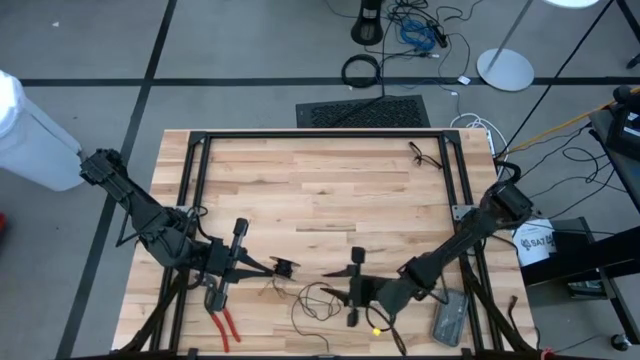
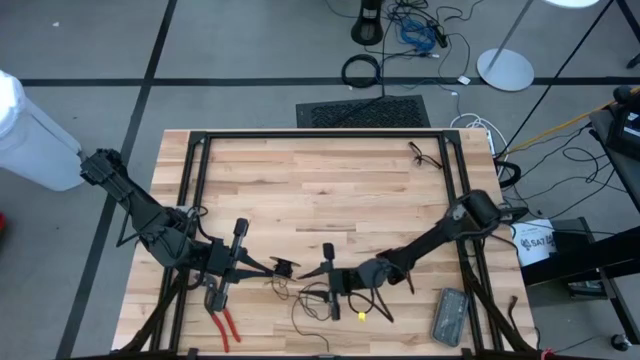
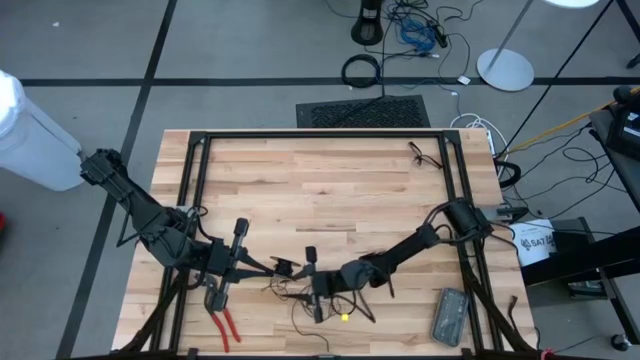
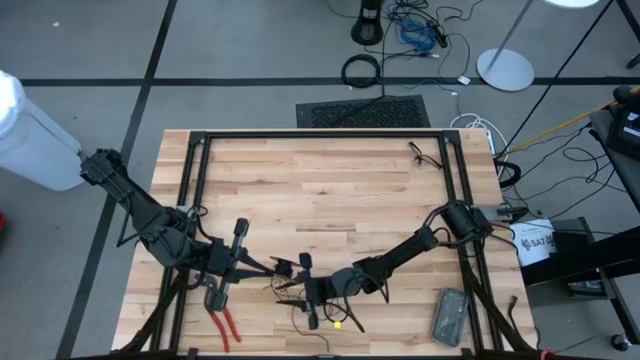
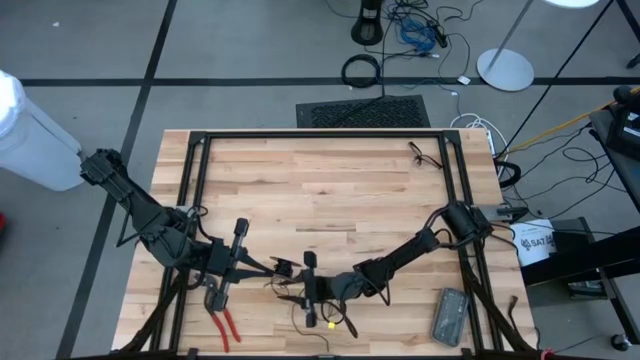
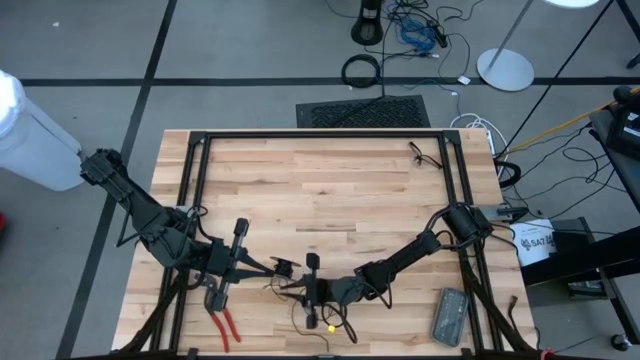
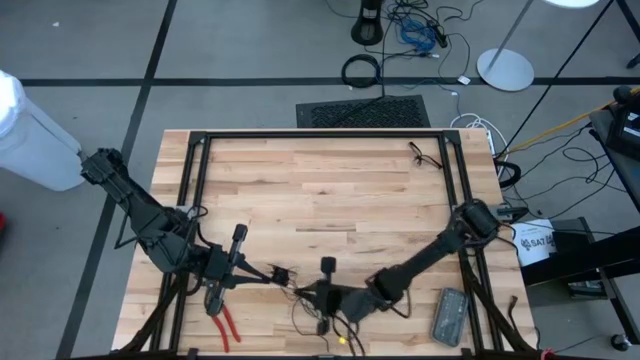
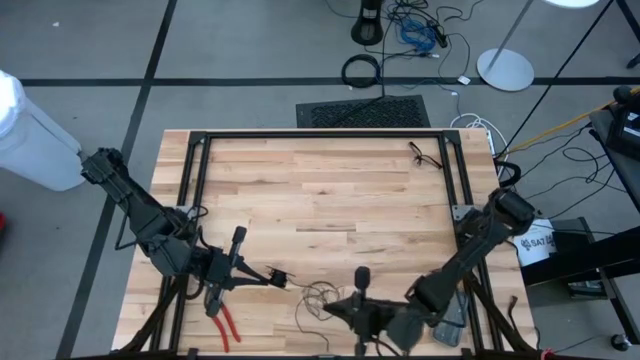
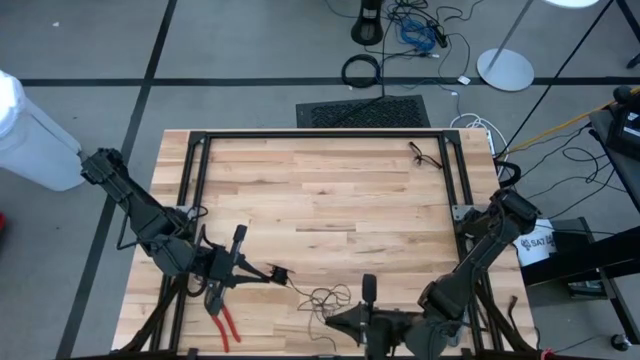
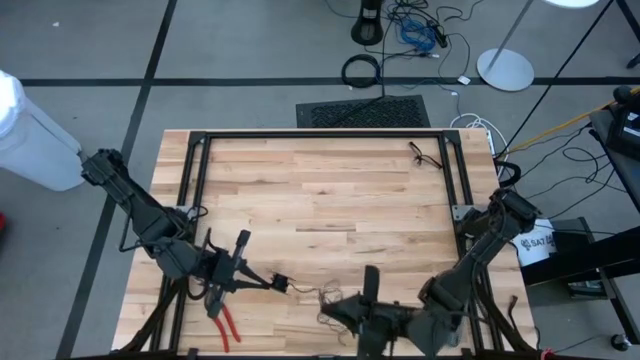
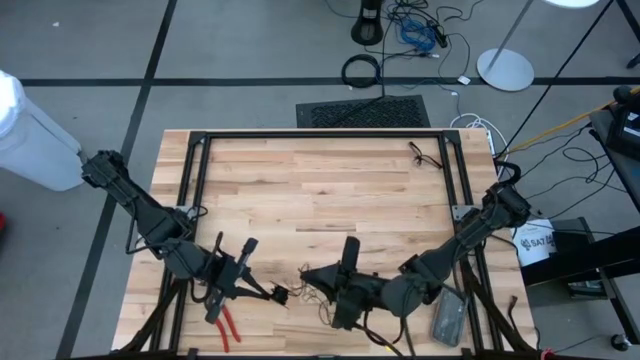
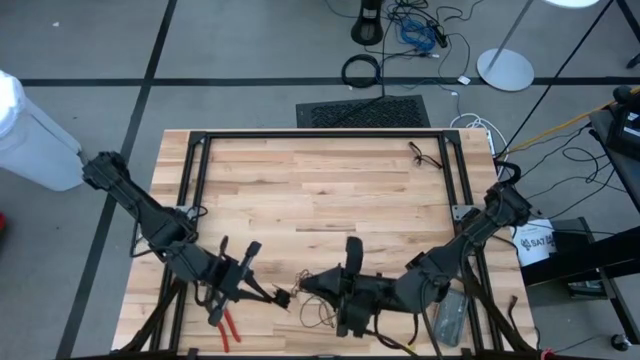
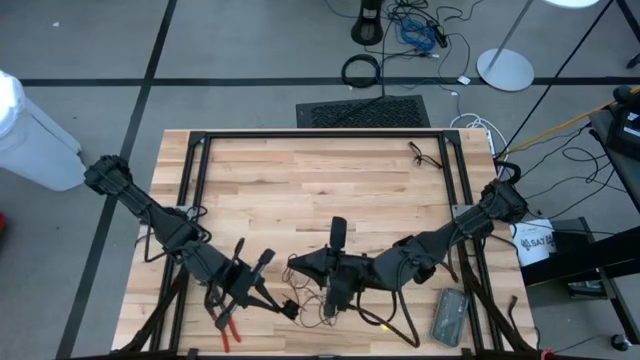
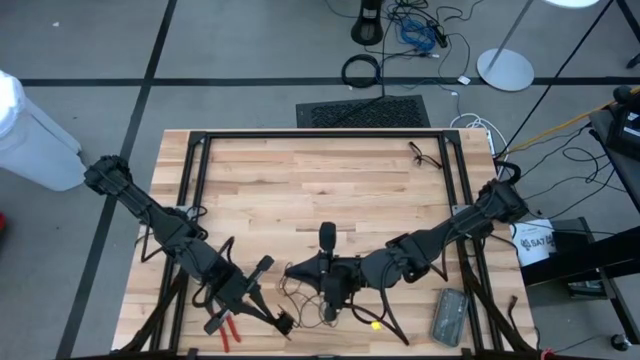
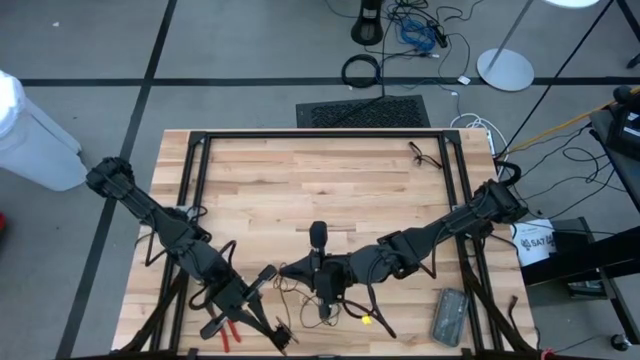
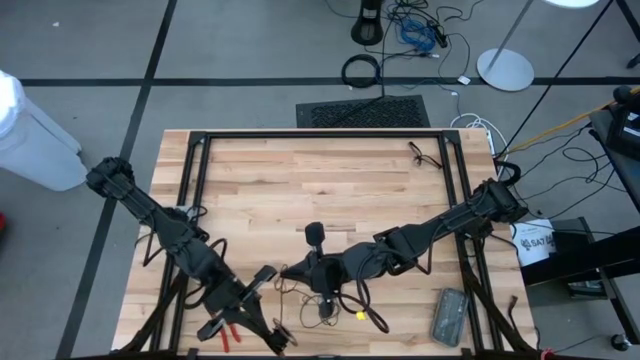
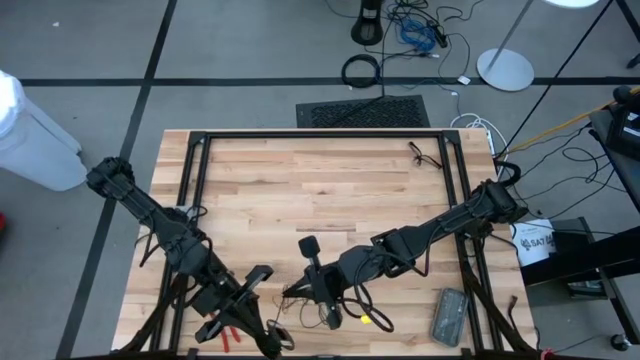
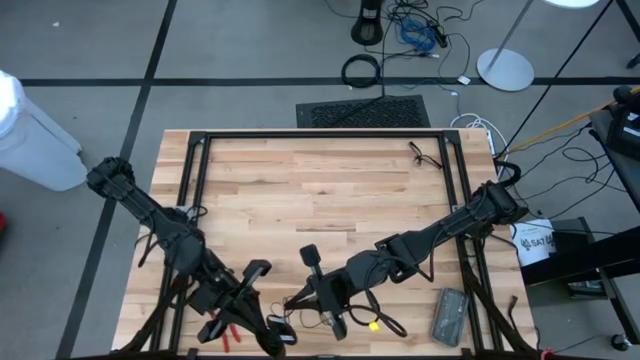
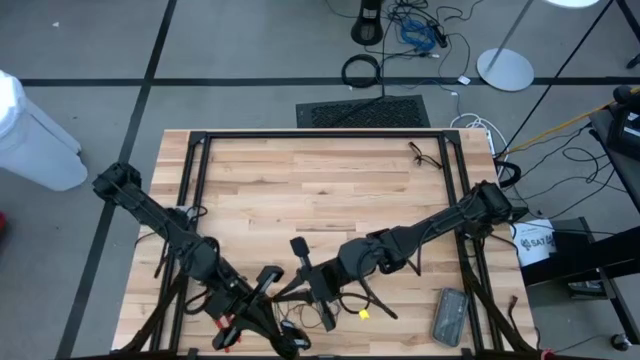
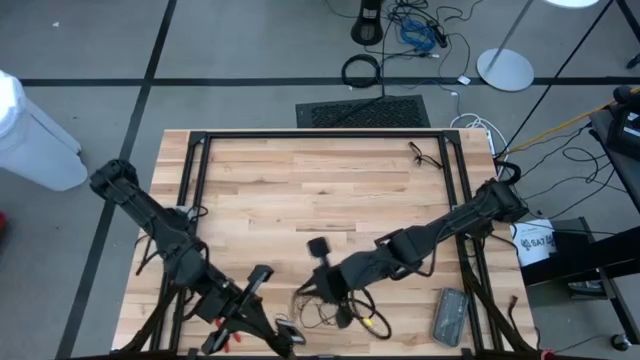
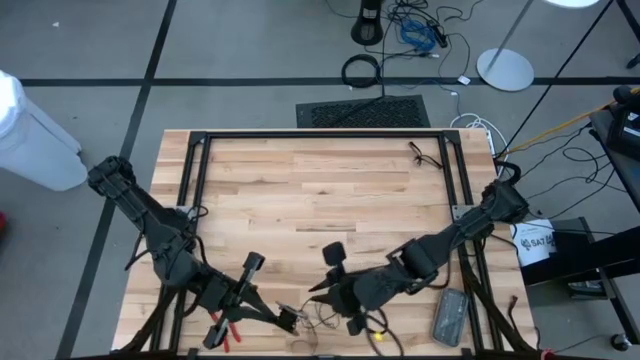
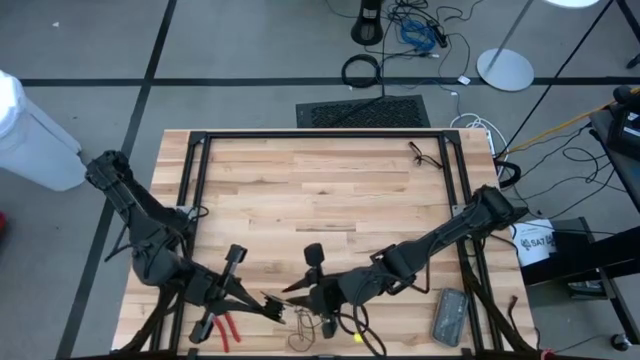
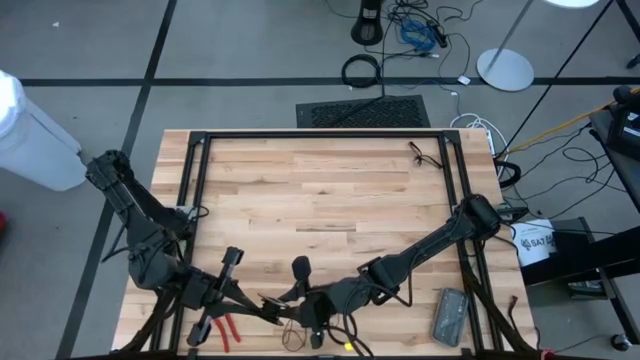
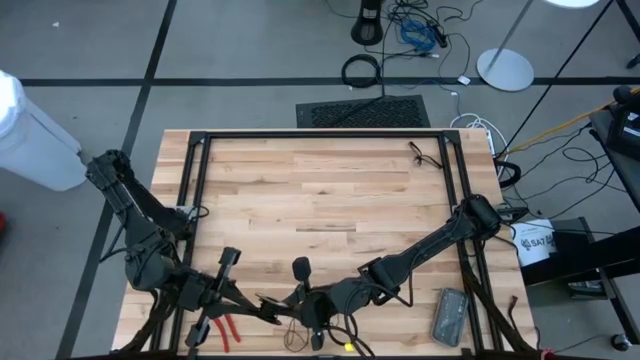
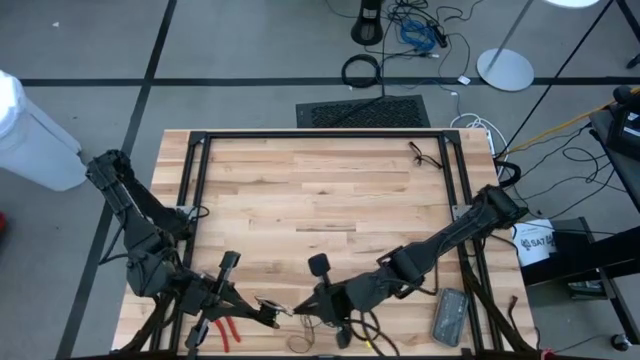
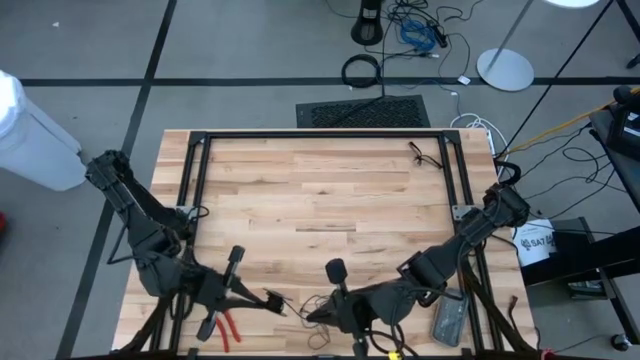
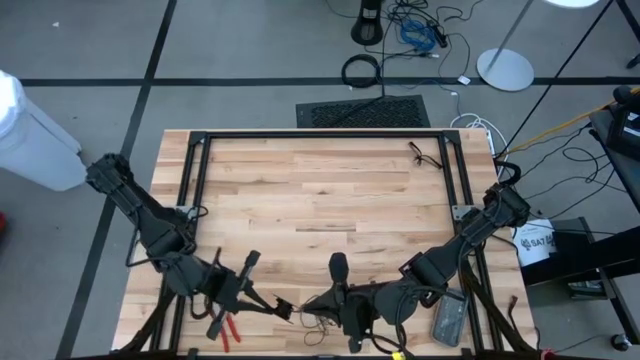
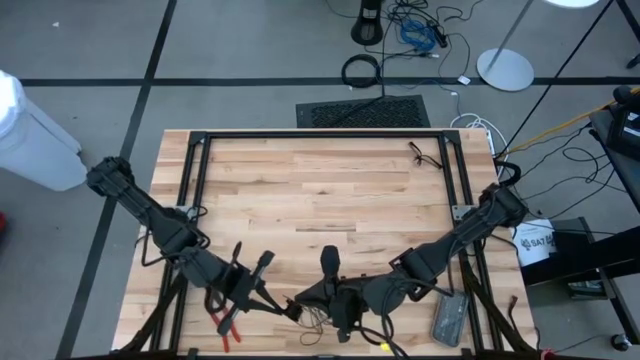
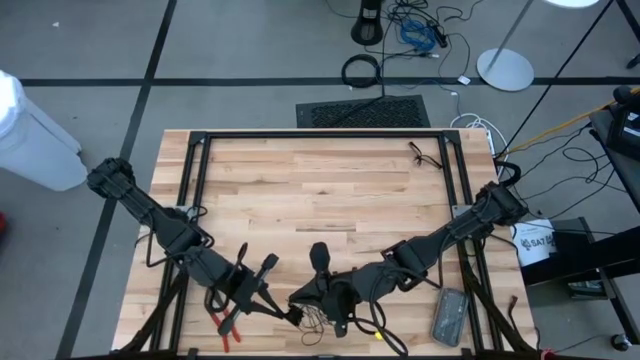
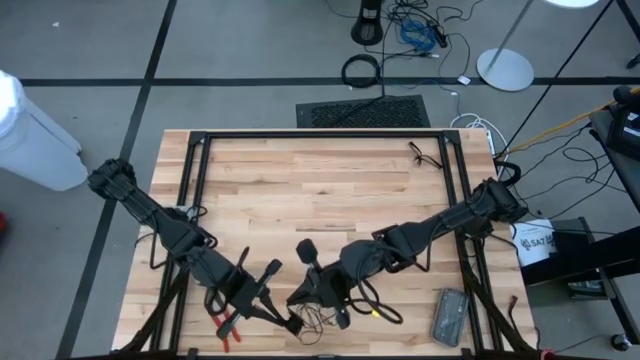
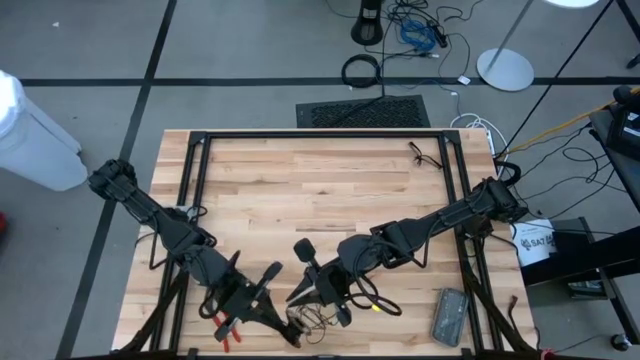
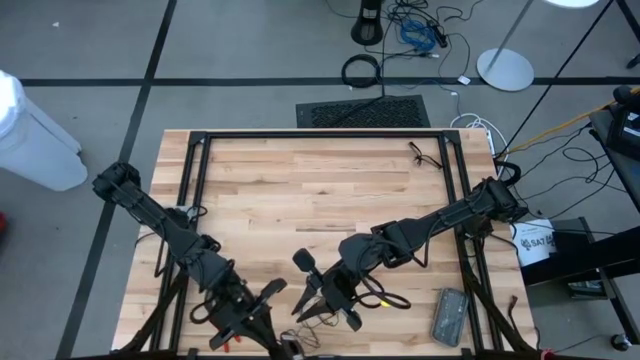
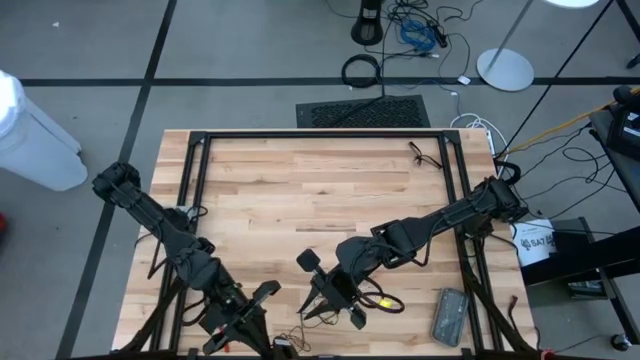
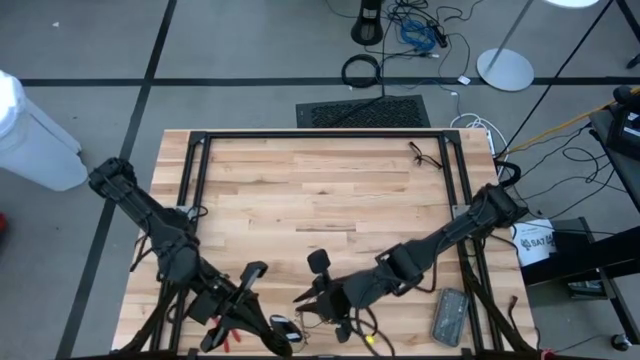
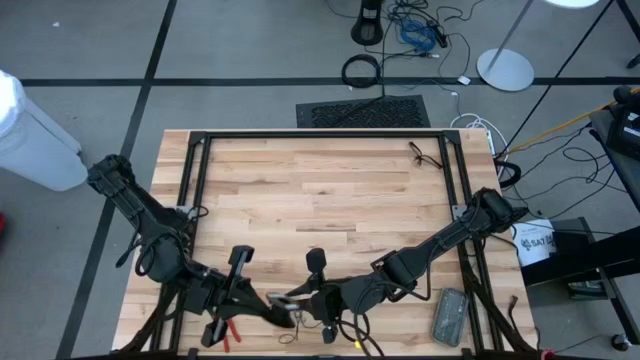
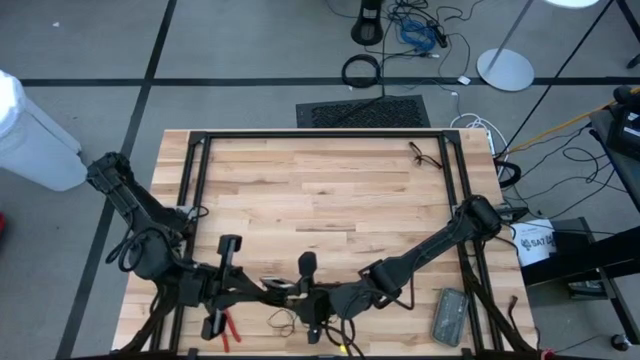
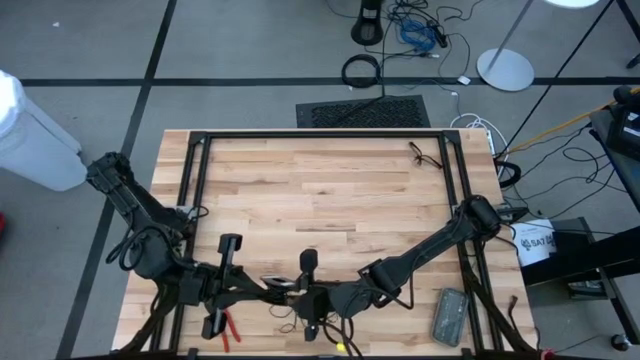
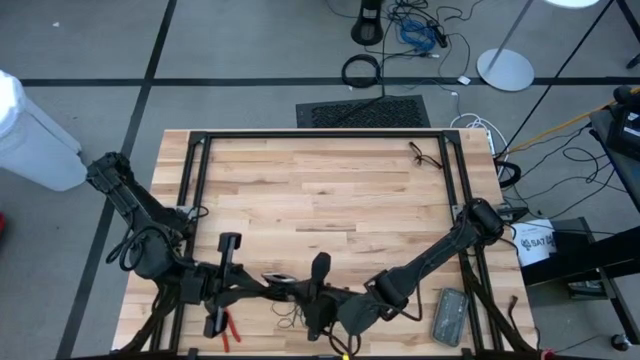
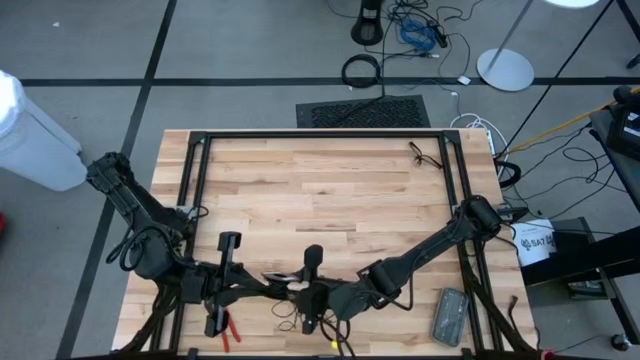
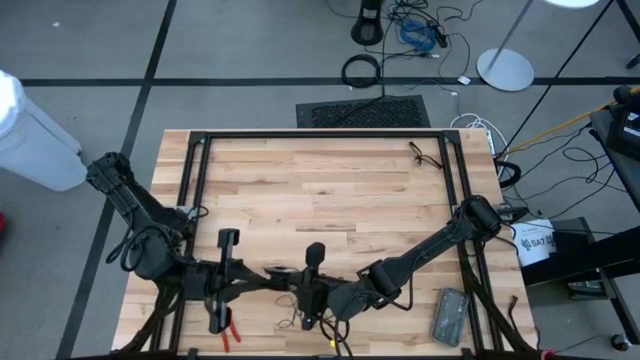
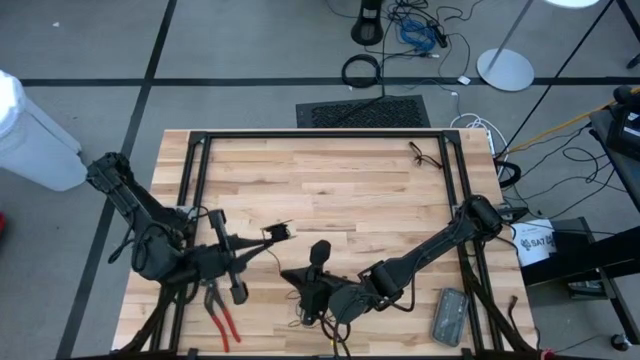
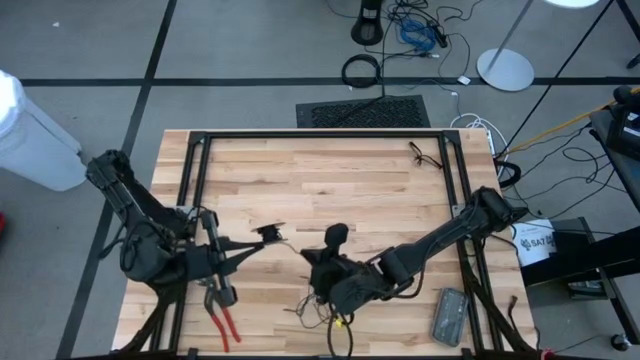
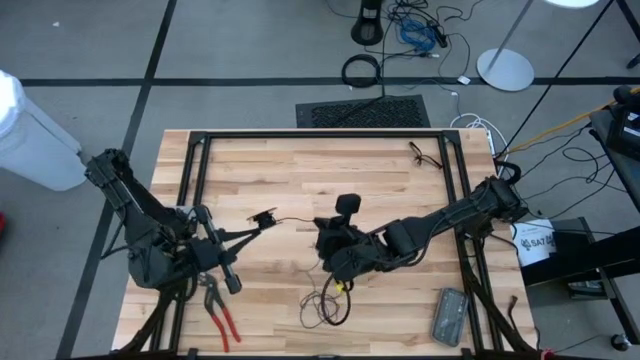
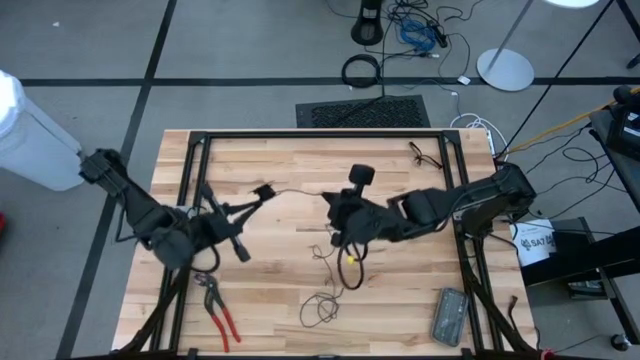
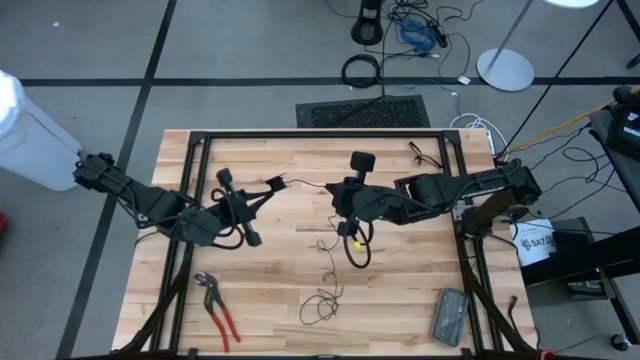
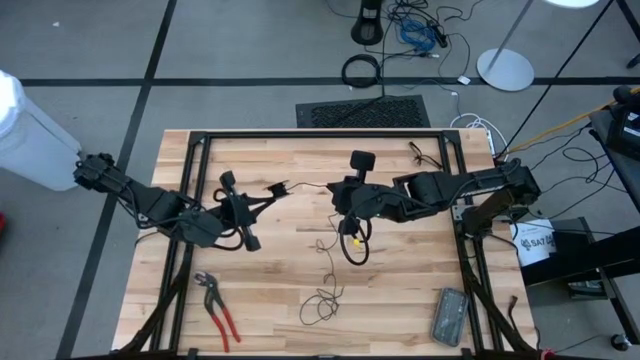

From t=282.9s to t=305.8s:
Task: Coil cords
Coil the black wire onto the black spool
